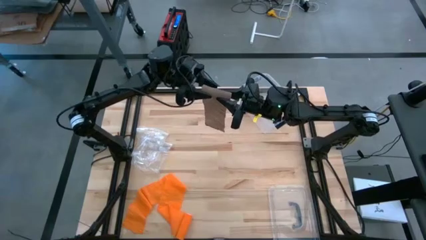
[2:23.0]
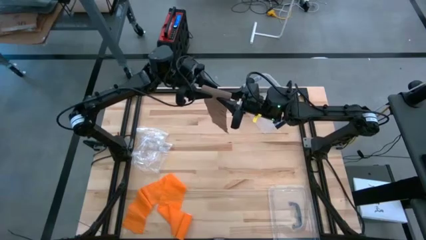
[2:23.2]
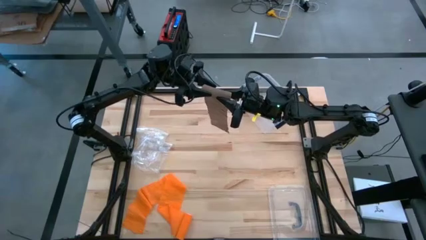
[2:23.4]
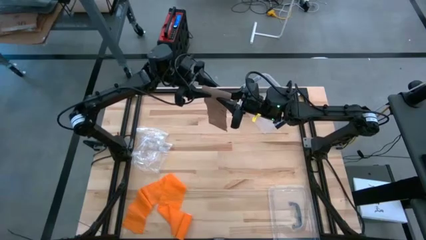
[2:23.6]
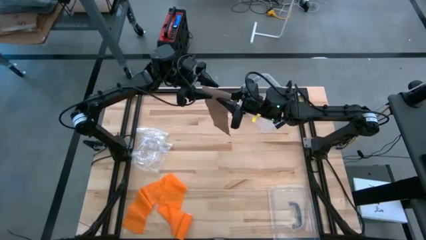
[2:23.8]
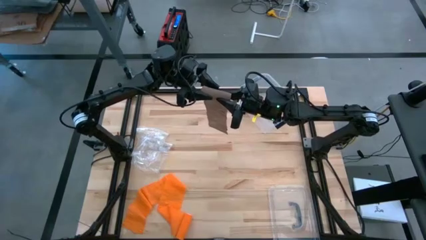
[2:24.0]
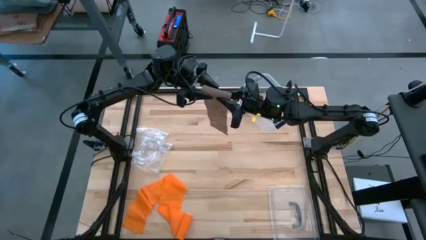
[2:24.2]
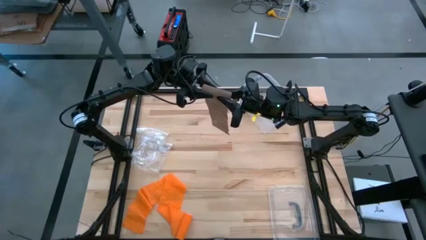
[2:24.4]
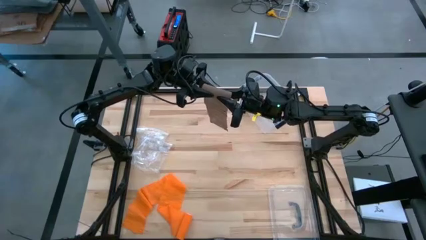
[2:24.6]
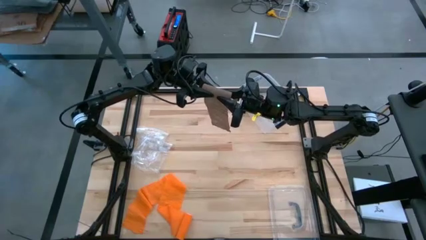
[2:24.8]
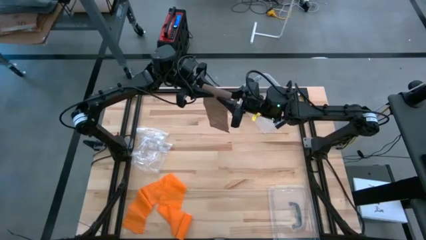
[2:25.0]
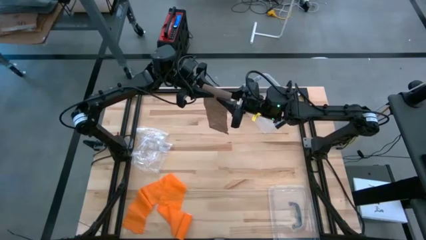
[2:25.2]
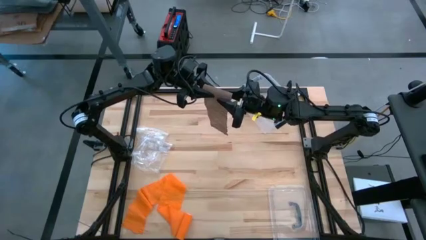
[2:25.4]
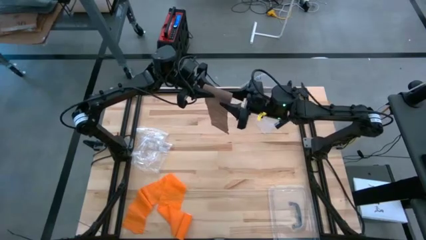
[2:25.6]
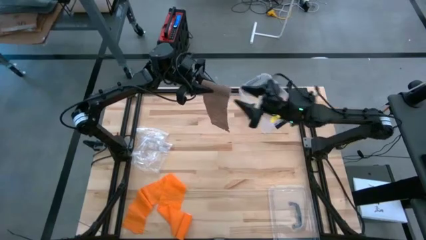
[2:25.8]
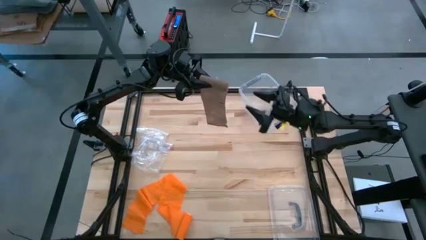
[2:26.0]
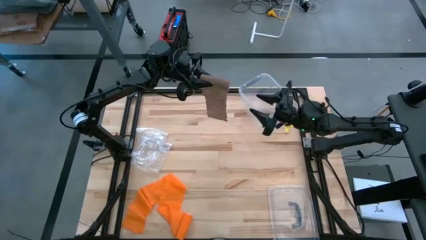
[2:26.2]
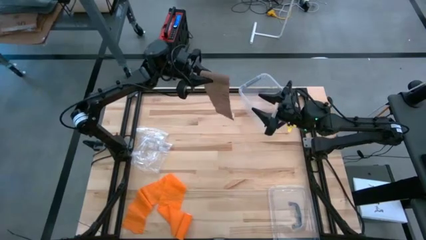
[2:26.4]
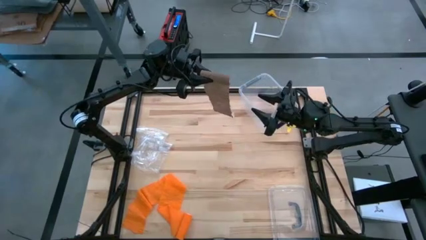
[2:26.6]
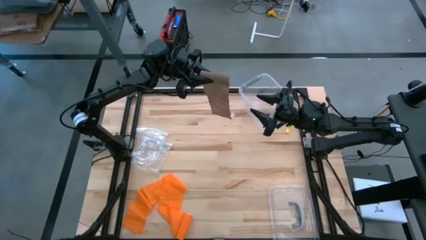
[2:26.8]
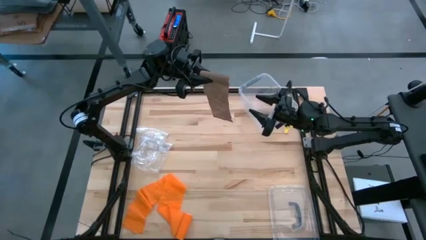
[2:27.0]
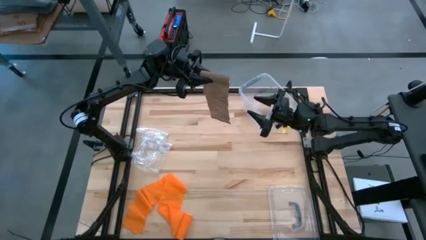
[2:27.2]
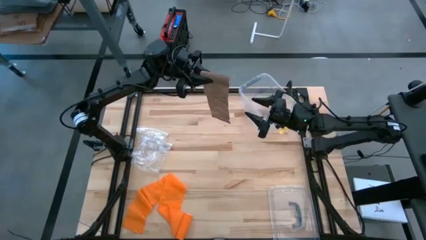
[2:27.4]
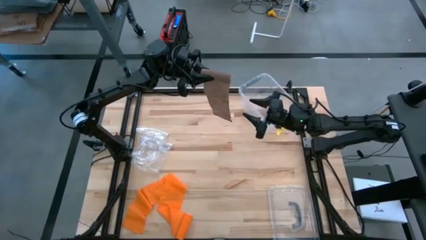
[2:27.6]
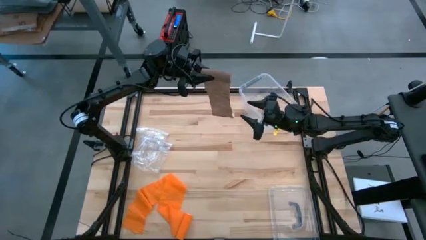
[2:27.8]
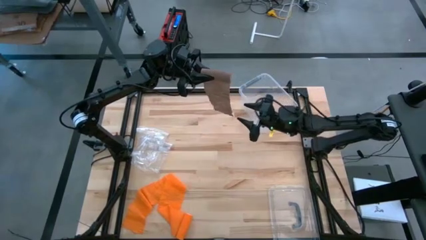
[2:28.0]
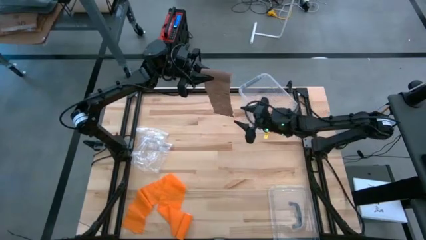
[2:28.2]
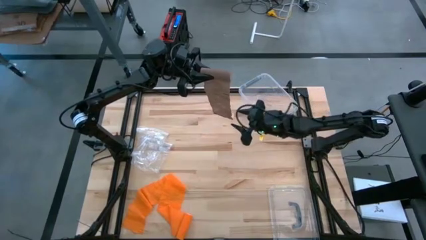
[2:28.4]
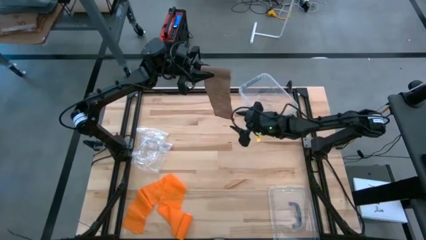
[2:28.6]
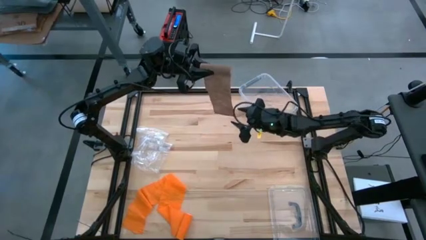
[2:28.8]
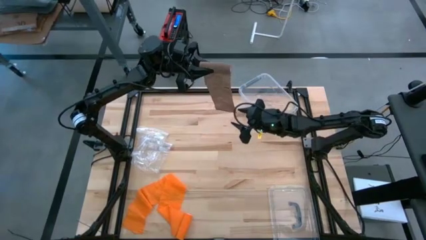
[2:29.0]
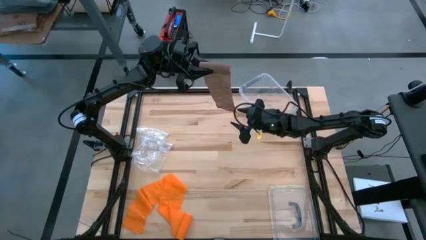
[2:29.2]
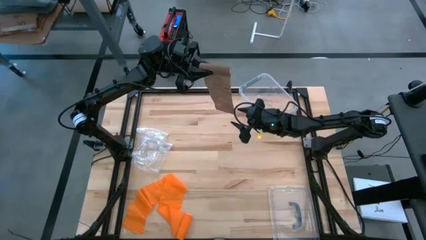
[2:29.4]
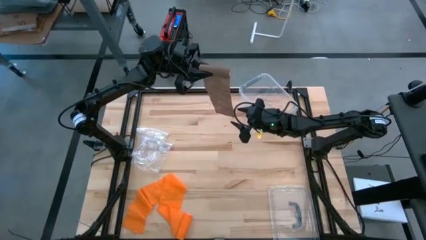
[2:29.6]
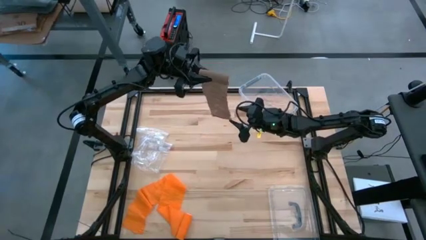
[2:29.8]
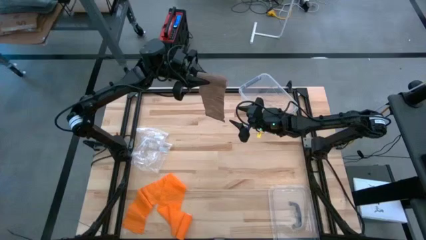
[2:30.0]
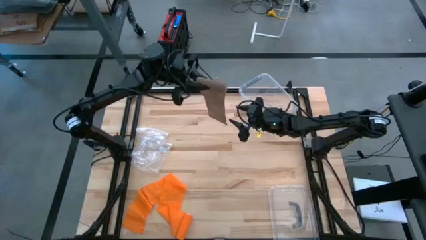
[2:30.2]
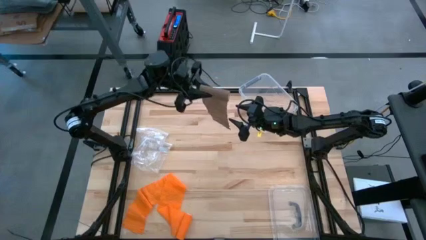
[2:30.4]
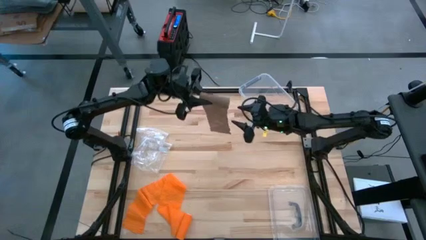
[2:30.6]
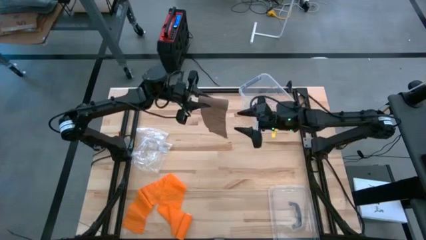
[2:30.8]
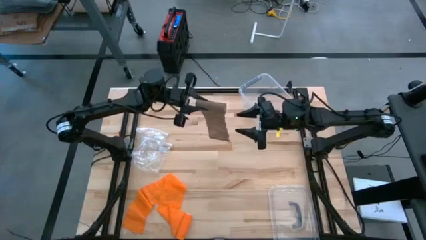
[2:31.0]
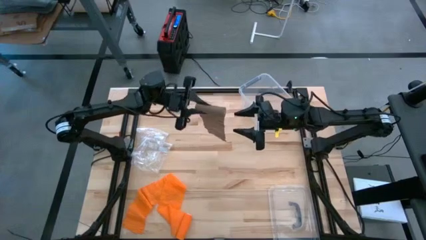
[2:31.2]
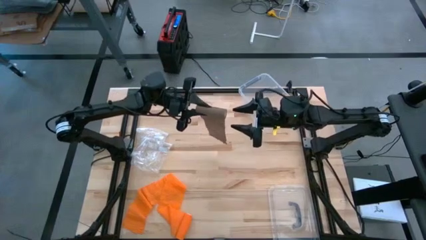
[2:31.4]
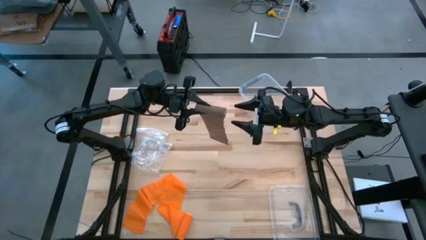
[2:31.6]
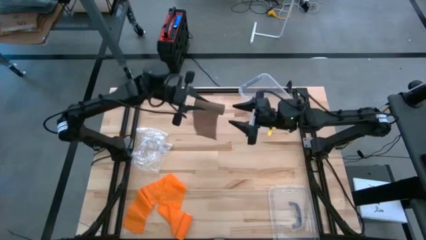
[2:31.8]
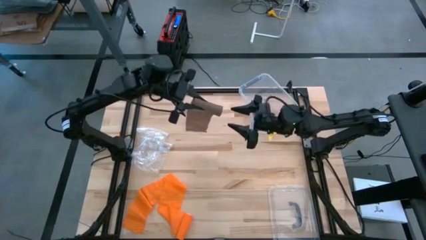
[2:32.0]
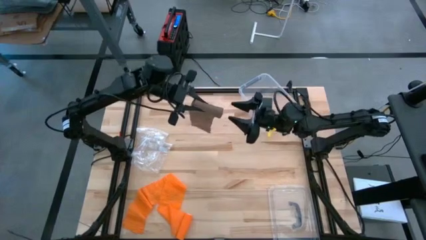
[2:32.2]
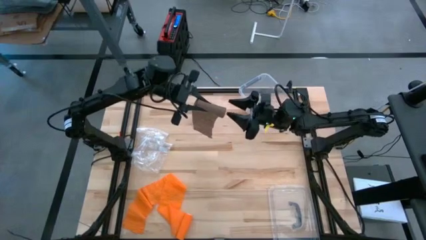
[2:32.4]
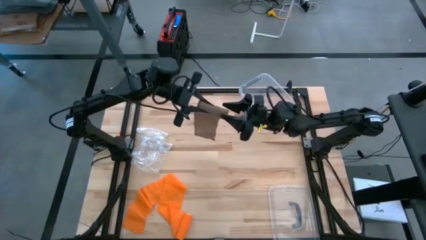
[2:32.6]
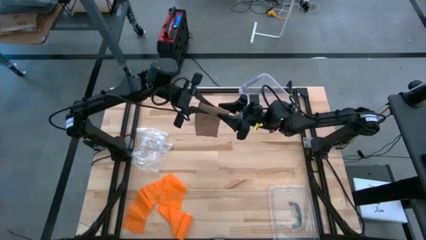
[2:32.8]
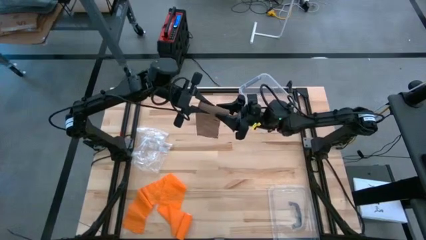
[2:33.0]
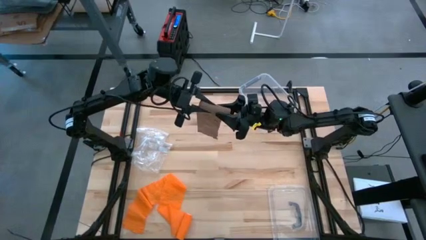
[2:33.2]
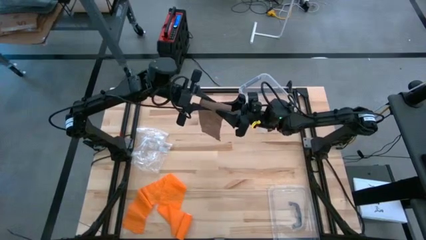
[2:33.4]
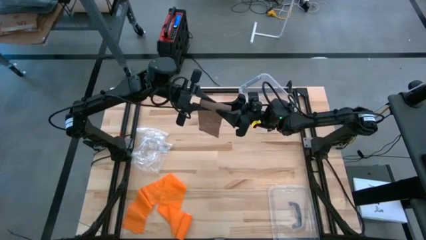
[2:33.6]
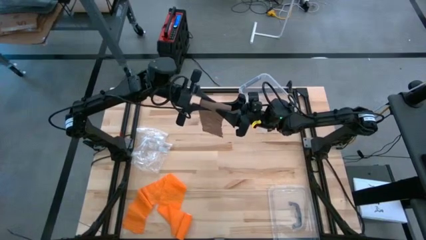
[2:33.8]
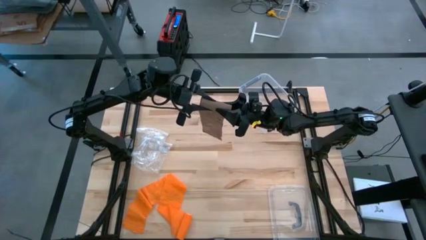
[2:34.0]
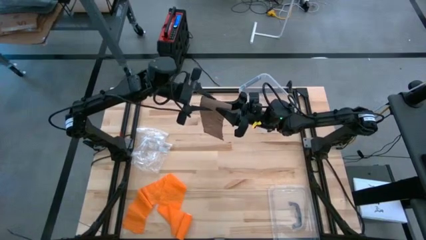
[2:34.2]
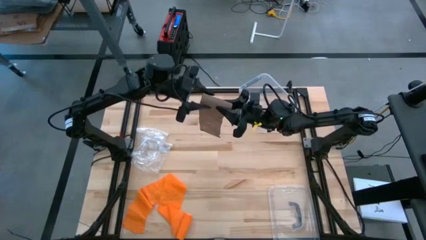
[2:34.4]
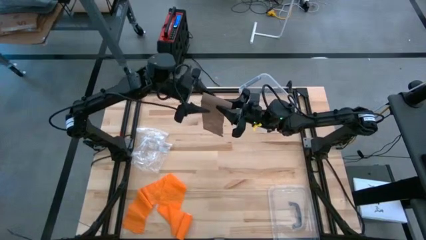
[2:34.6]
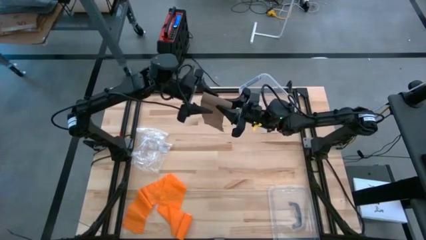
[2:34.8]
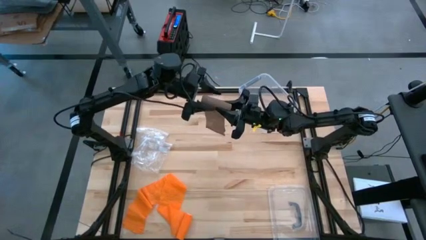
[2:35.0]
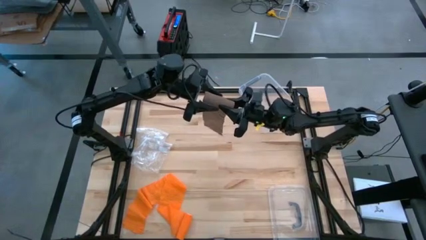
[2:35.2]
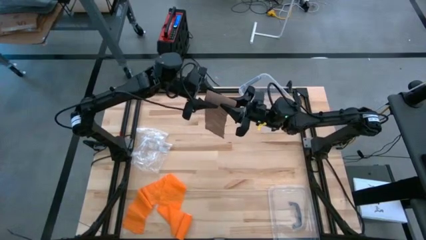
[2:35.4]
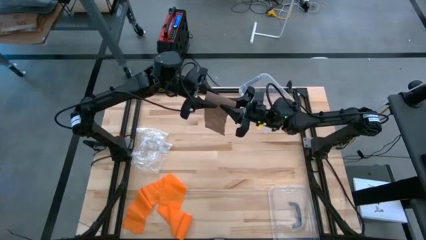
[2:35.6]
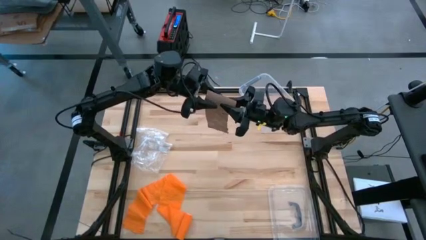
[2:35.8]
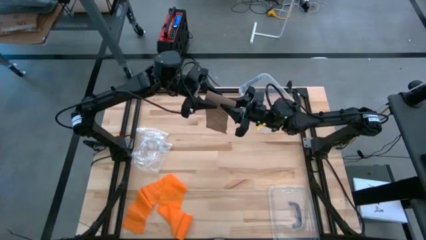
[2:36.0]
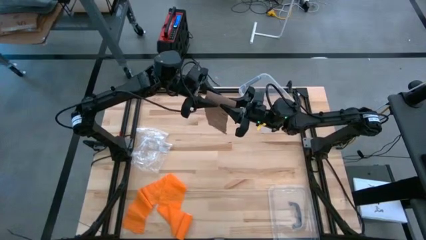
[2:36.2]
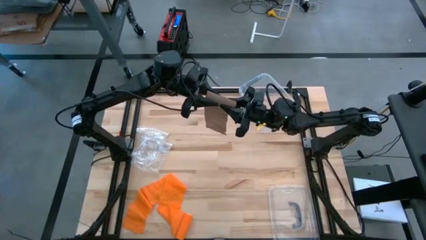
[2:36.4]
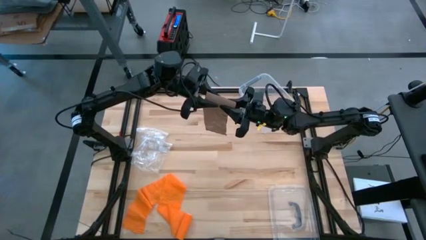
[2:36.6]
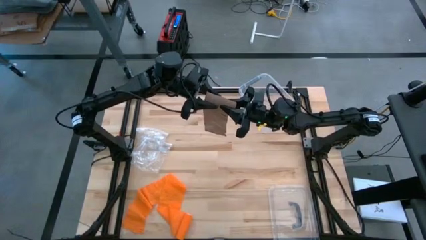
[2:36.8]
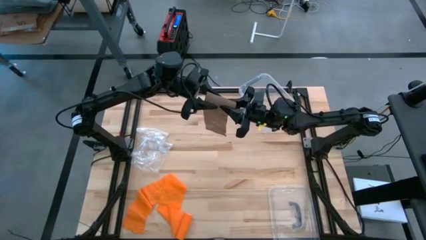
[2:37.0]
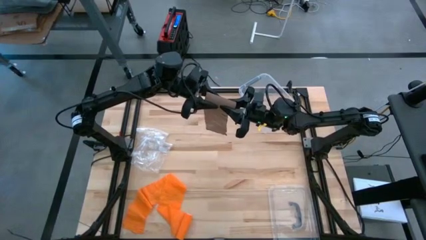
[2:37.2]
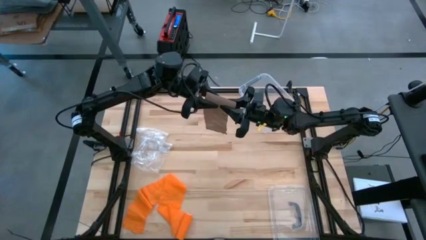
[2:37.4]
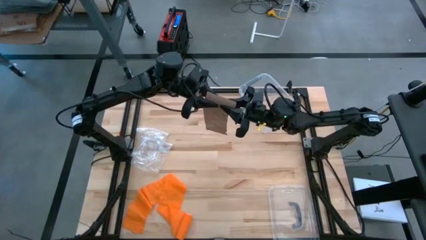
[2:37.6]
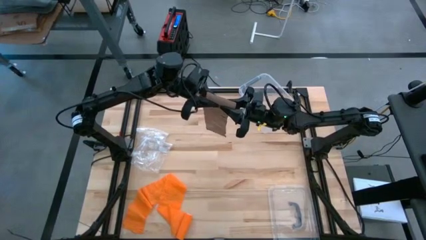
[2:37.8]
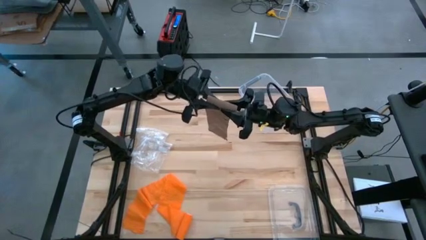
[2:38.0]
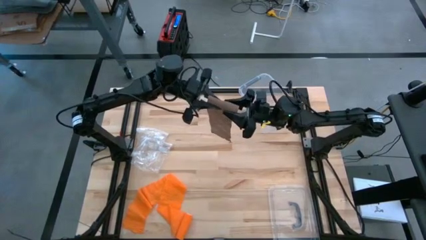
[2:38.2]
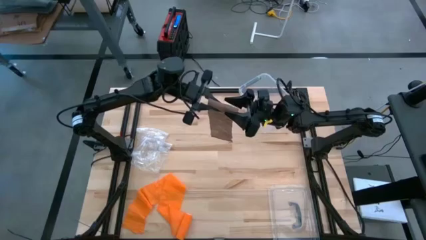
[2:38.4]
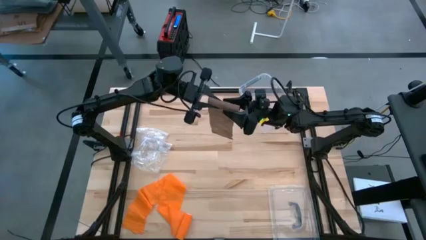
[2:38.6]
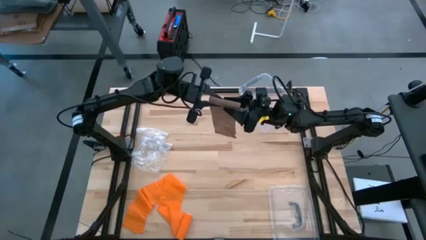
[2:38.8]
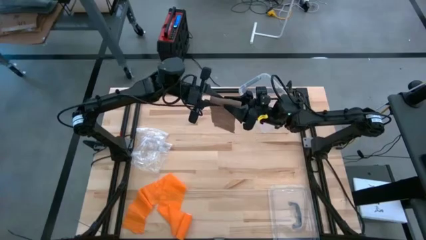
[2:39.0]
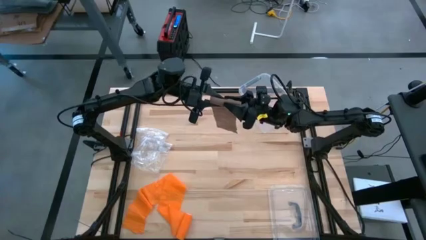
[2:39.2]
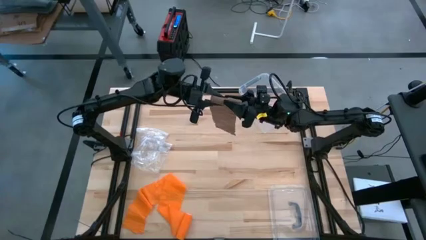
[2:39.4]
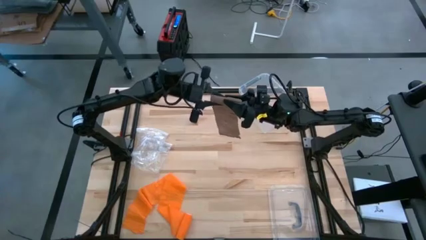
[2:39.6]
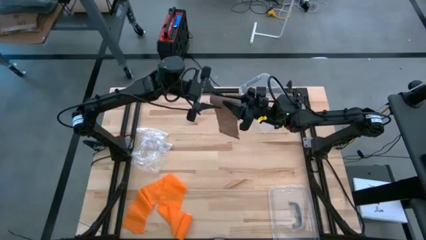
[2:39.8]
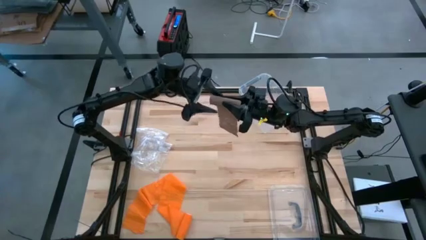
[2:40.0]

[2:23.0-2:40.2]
Task: Roll bandage
Roll the brown bandage
